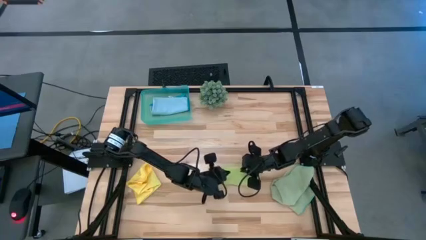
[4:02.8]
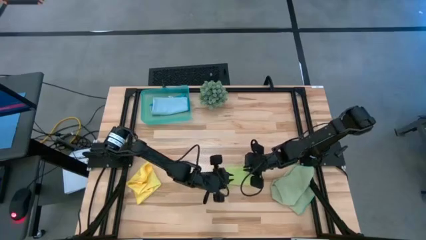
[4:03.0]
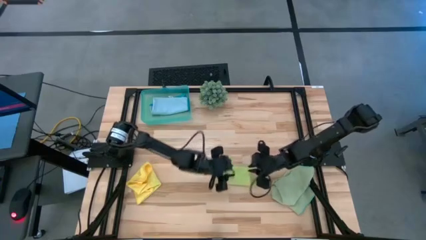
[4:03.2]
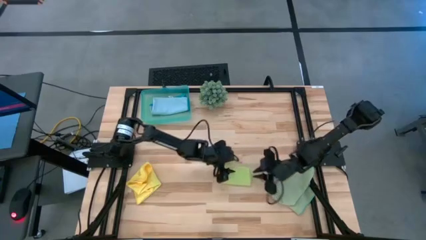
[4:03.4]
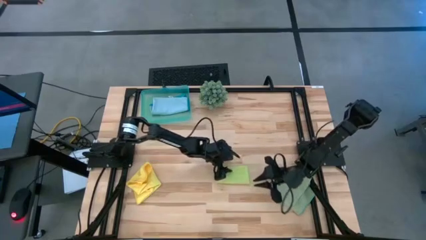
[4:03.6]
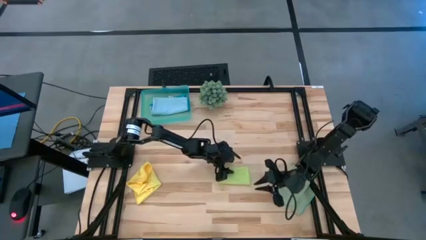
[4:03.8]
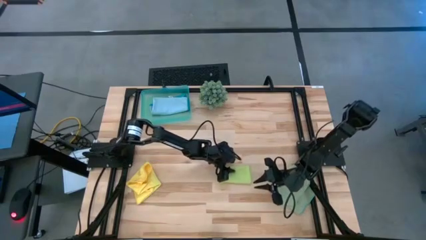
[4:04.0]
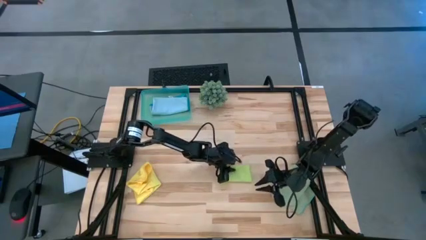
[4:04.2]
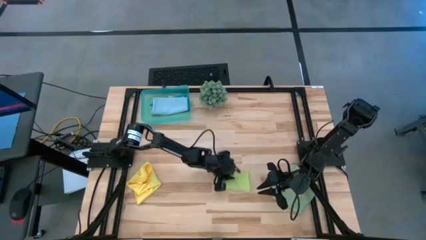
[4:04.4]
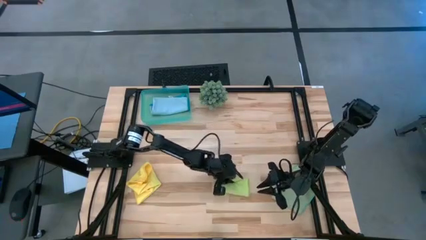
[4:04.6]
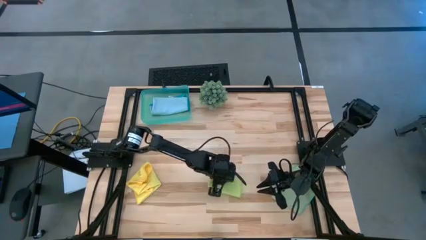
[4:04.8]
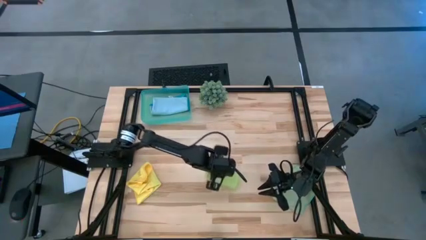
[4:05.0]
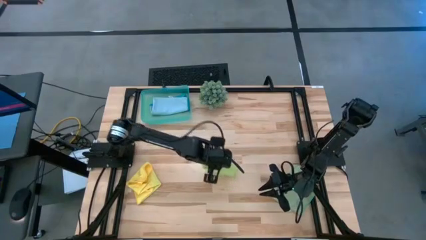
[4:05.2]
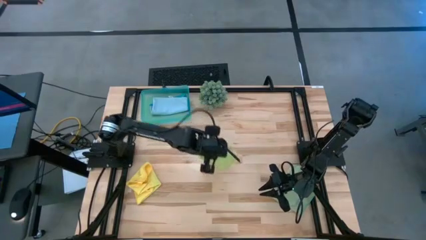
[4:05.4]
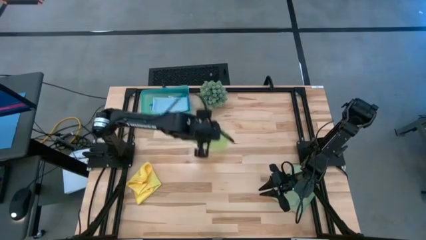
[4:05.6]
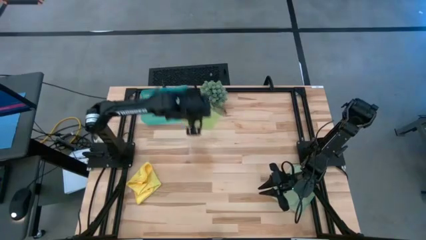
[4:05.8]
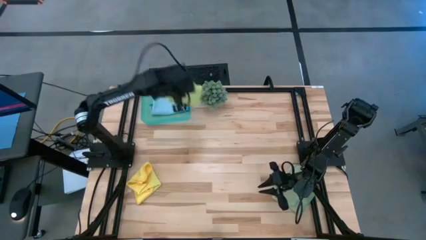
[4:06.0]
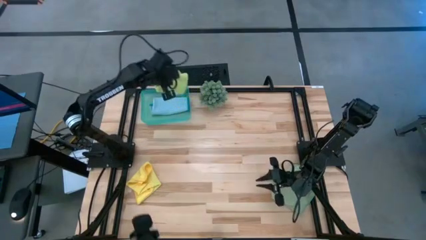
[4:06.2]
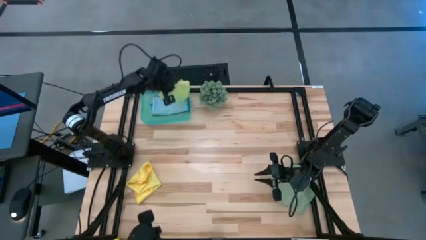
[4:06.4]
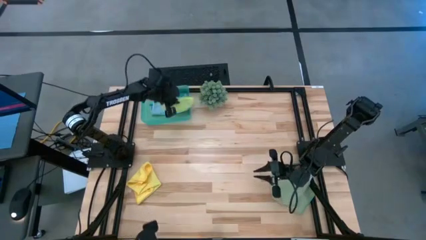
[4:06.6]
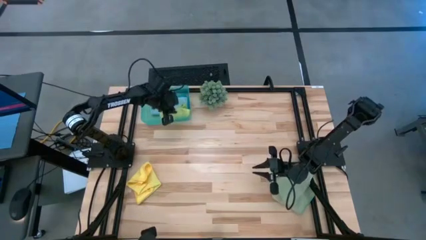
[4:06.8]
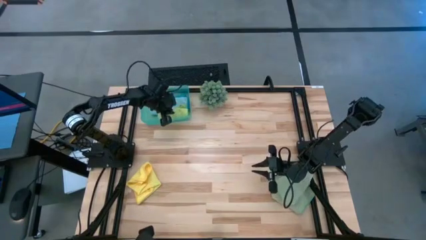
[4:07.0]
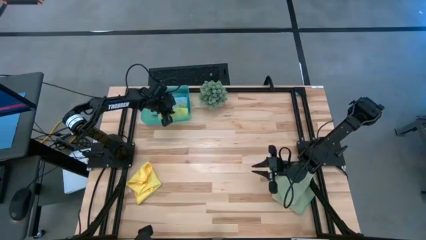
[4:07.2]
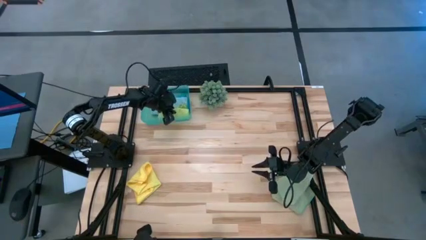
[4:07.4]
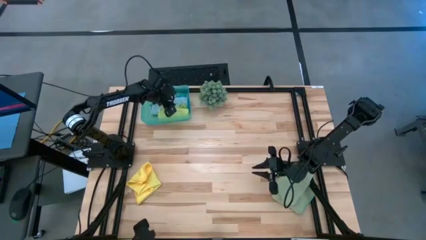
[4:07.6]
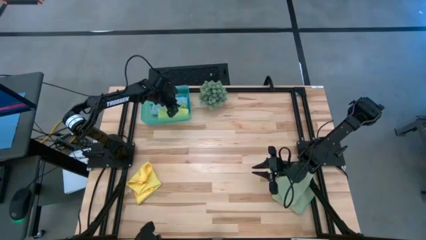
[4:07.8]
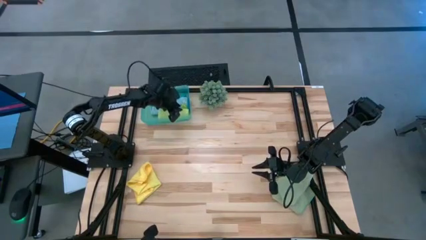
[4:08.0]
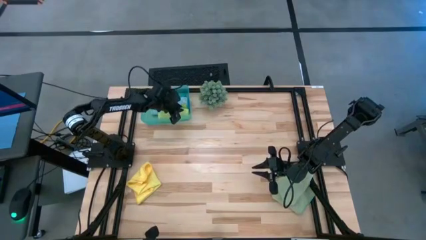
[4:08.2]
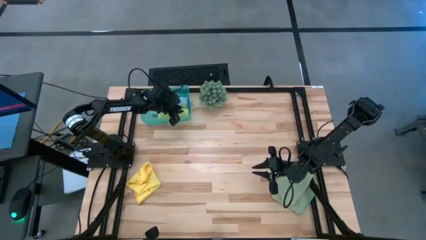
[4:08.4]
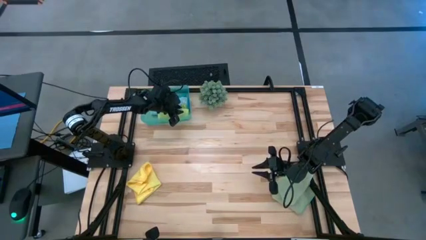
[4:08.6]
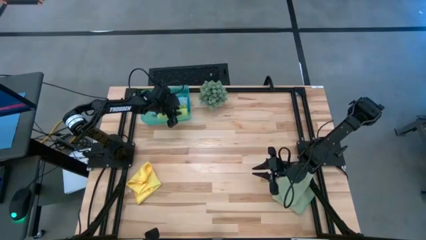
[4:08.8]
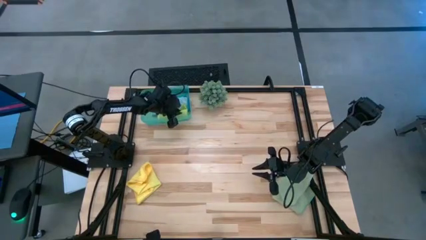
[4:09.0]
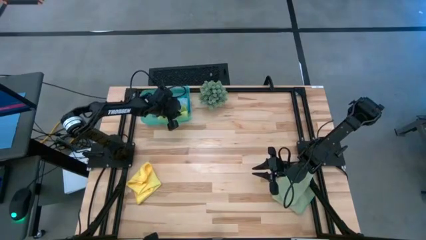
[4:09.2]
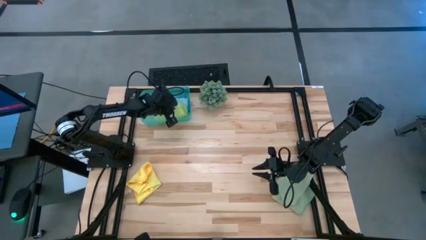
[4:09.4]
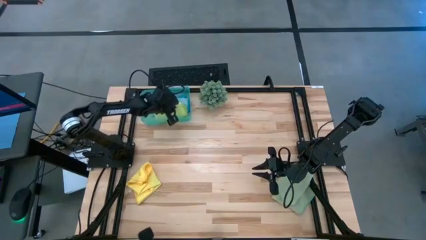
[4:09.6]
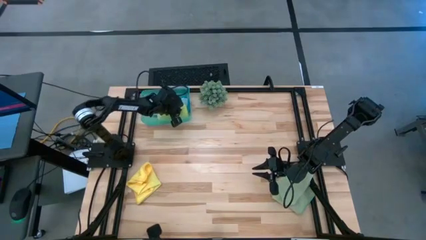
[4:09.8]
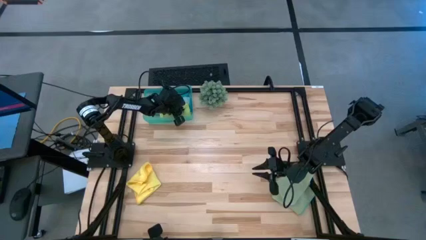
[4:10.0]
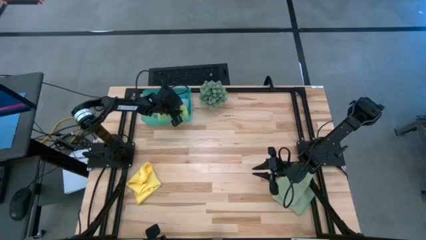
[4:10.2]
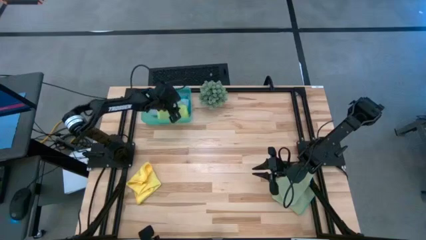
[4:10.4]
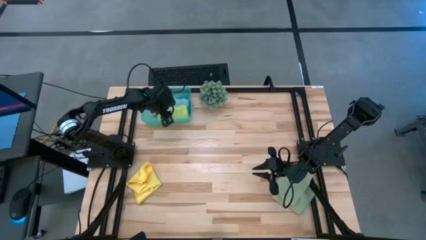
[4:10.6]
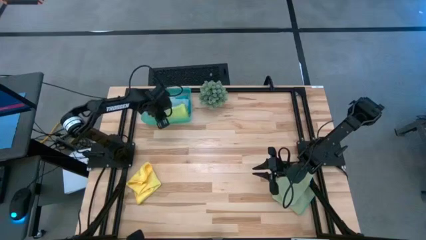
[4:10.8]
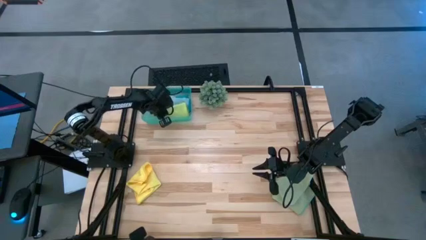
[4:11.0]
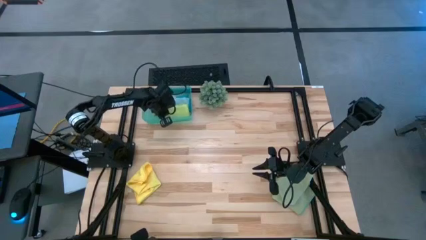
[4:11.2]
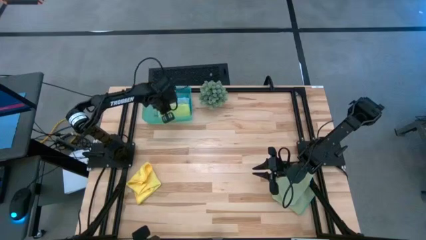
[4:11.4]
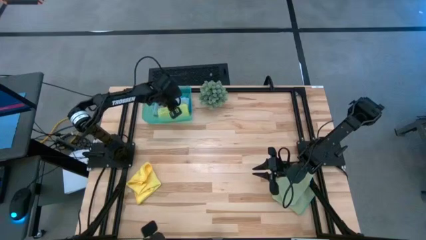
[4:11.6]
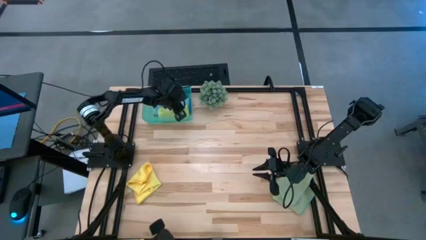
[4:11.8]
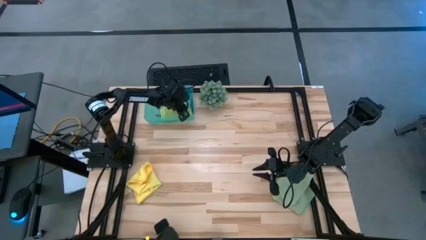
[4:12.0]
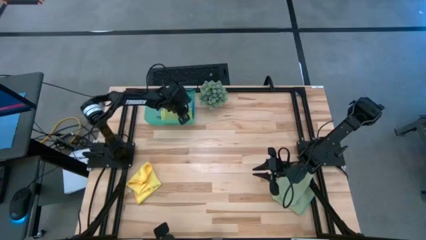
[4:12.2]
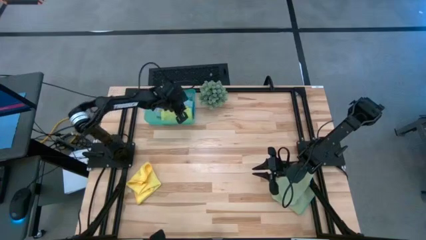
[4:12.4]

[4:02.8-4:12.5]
Task: Fold microfiber towels
Put the folded light green microfiber cloth into the blue bin

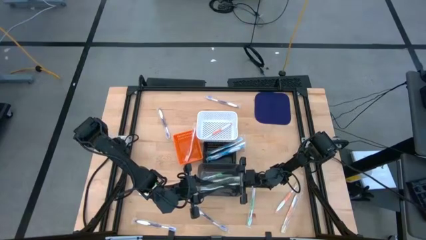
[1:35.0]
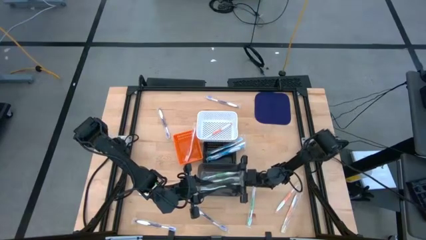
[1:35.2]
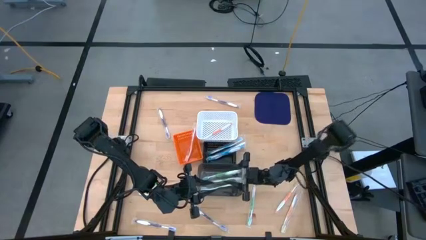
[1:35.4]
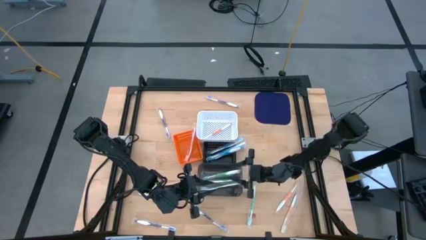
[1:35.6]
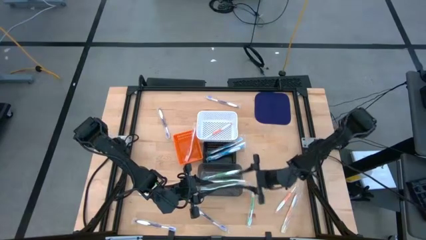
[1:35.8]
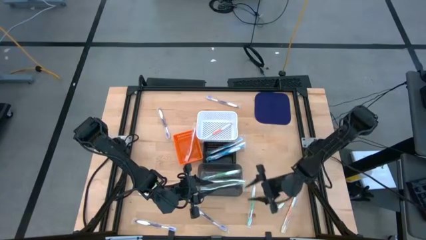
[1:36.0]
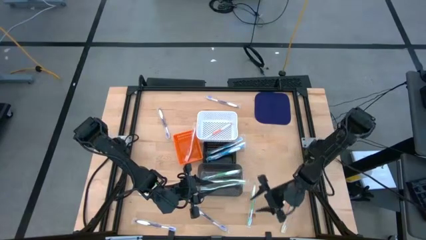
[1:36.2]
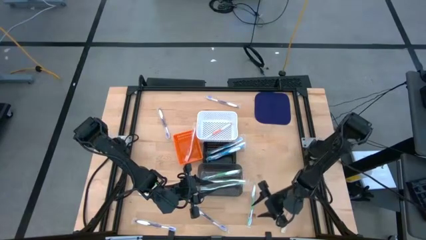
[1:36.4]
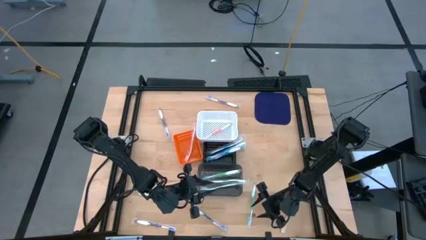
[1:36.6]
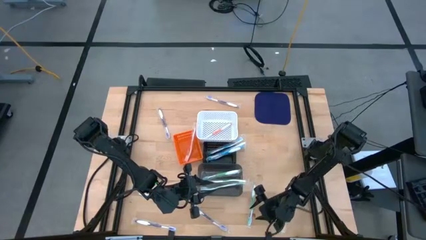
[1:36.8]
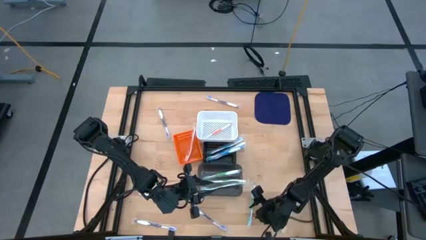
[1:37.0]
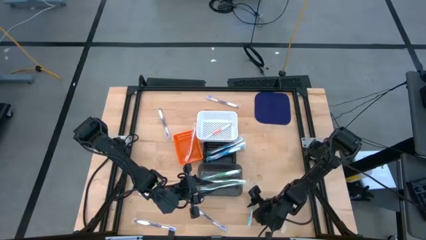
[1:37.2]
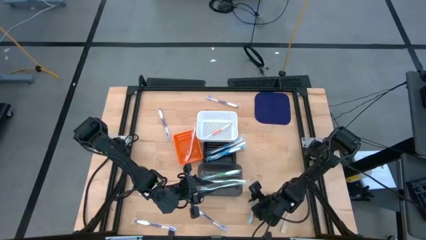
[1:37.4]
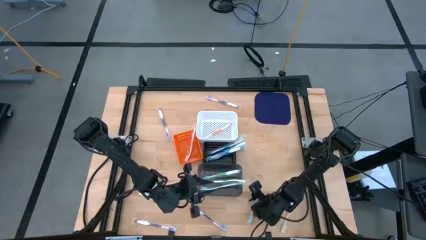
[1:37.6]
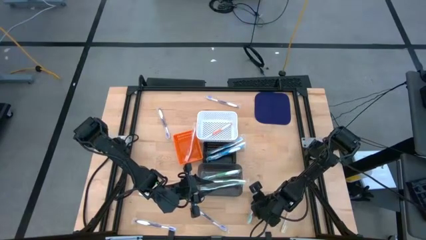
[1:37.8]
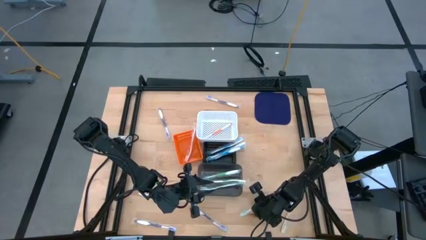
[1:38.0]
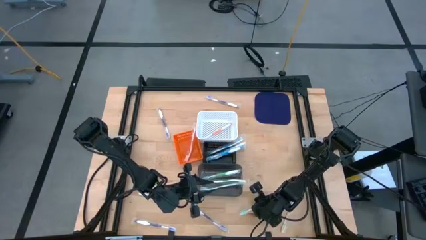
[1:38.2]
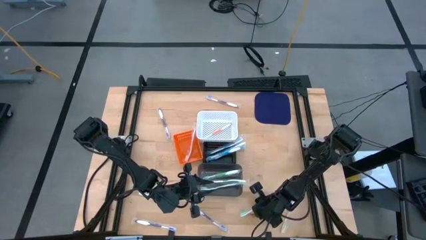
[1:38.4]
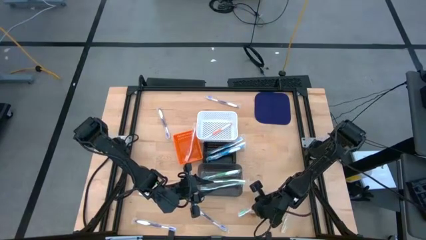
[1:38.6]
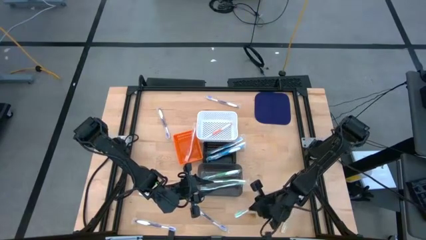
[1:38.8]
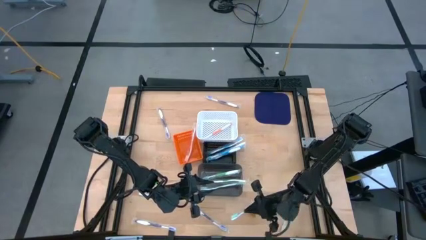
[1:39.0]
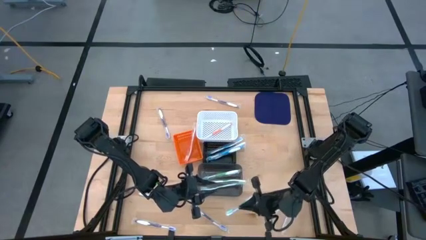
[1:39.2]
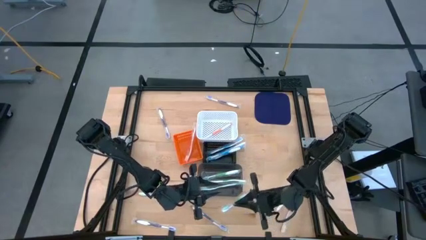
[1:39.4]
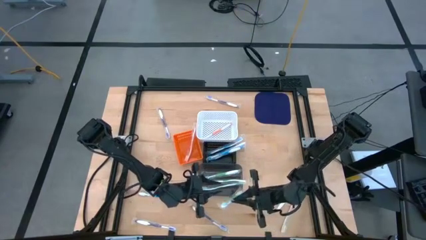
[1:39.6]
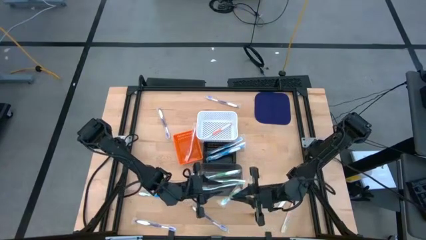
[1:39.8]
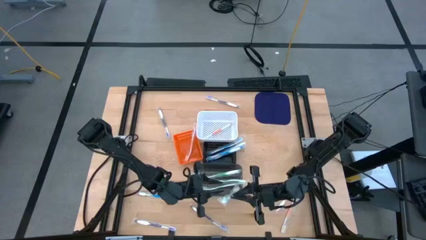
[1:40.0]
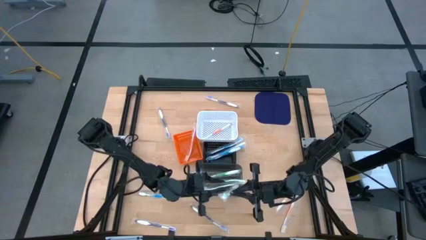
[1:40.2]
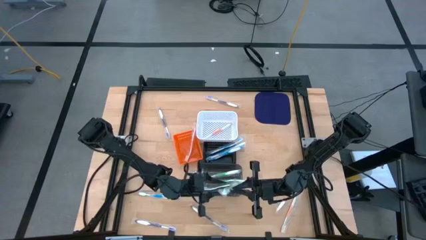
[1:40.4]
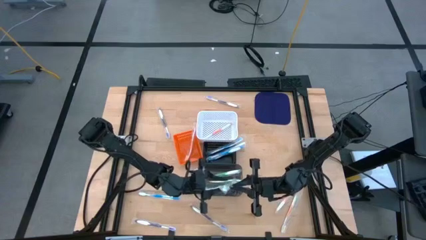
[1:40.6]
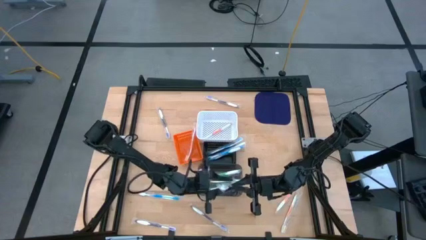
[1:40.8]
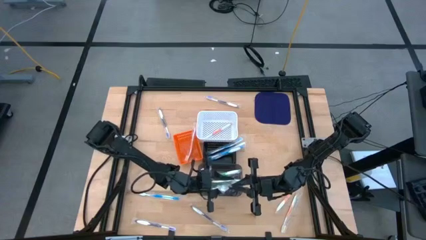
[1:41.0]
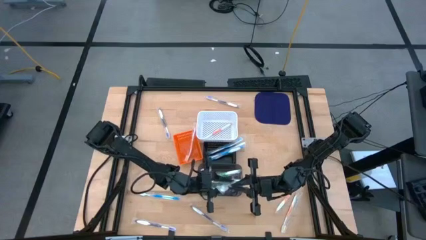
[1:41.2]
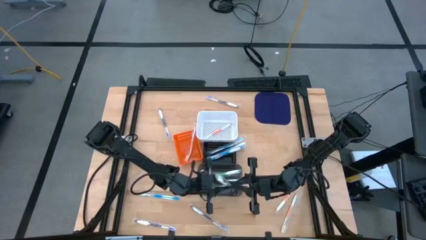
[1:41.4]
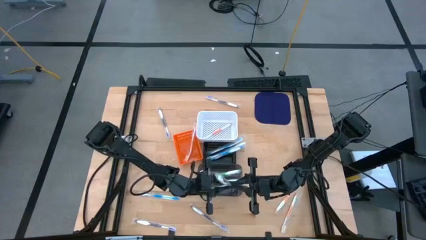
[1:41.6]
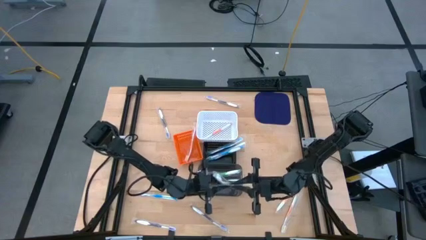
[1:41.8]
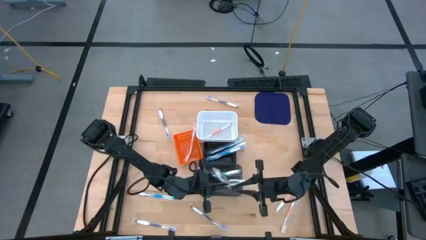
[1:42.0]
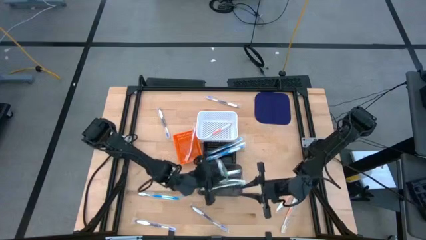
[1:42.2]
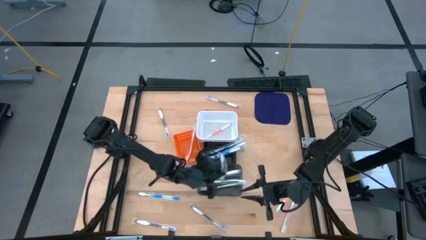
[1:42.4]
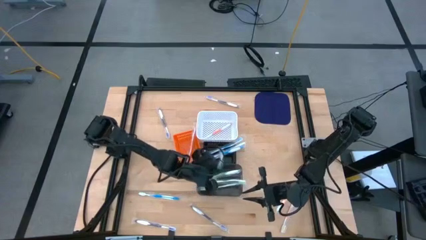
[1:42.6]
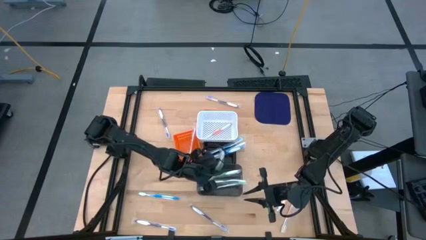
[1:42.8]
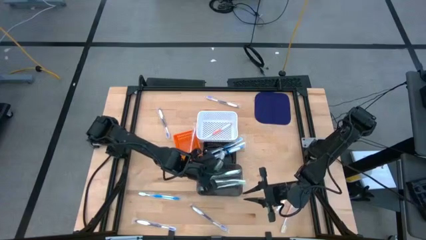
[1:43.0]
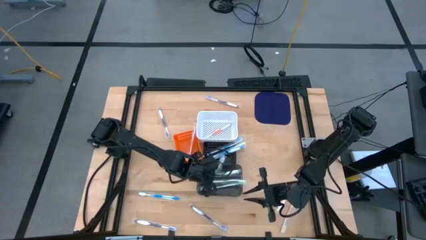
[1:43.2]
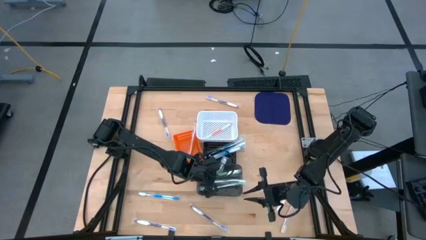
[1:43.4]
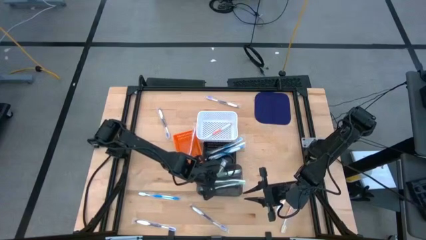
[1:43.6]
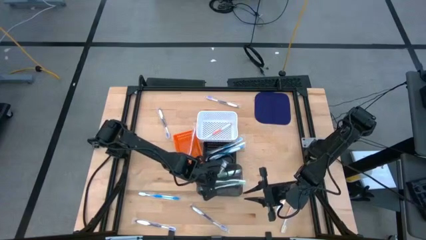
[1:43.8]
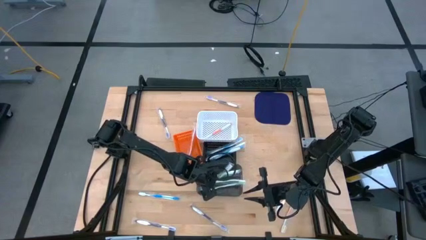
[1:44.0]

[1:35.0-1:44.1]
Task: Pick & Place Toothbrushes
Put the green toothbrush into the black bin
